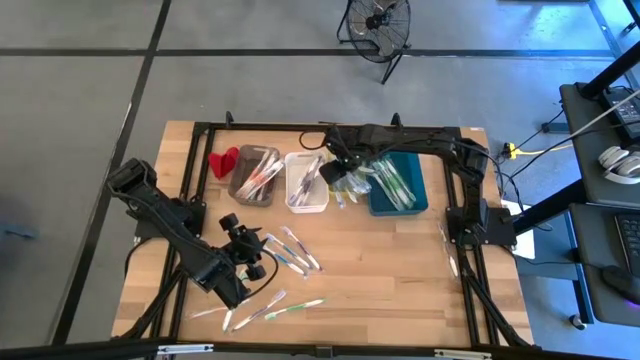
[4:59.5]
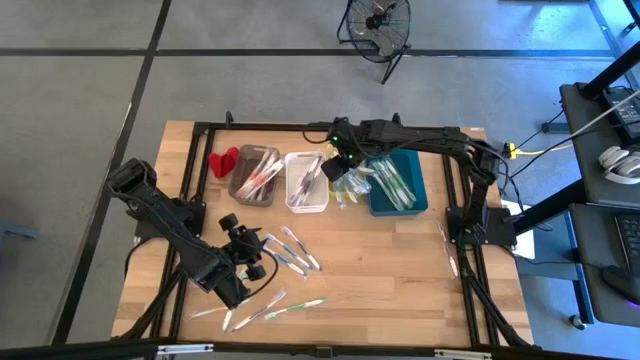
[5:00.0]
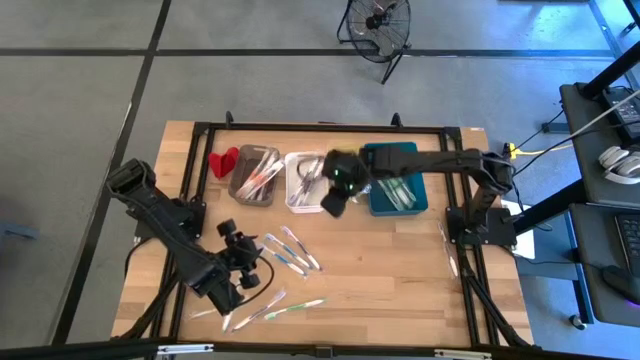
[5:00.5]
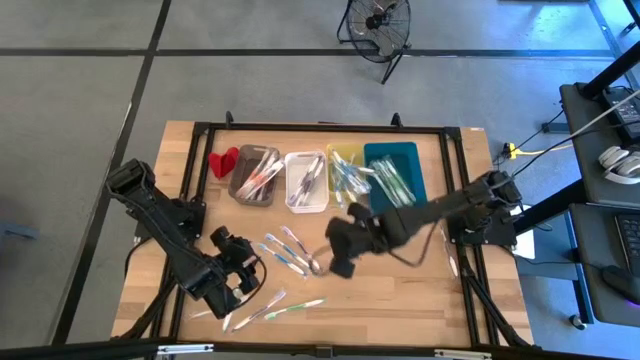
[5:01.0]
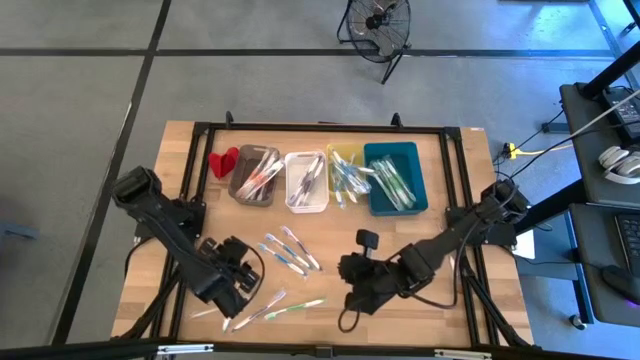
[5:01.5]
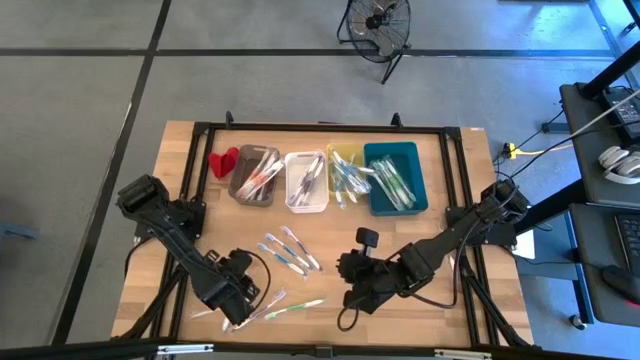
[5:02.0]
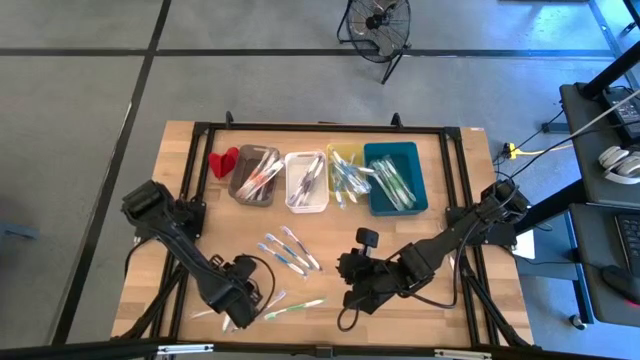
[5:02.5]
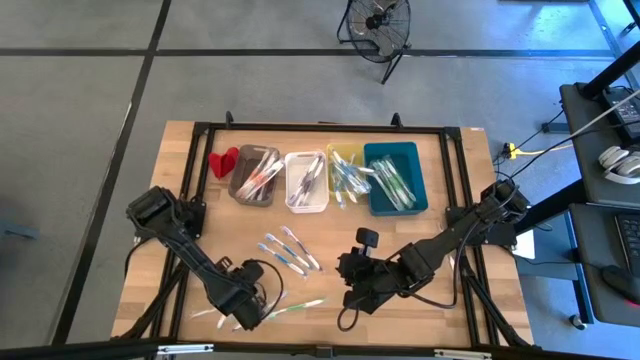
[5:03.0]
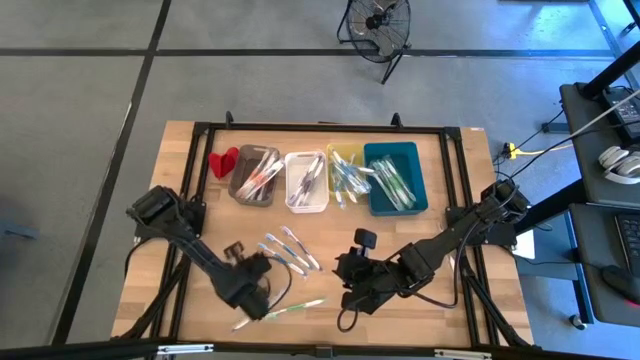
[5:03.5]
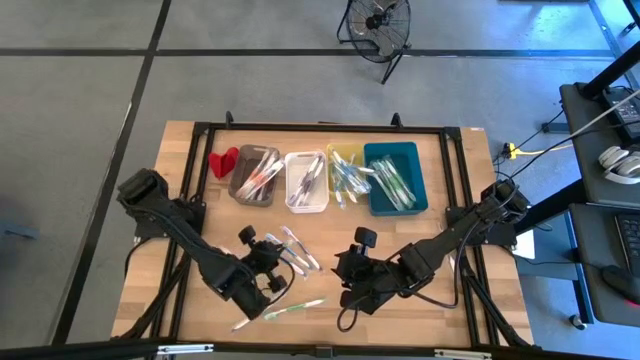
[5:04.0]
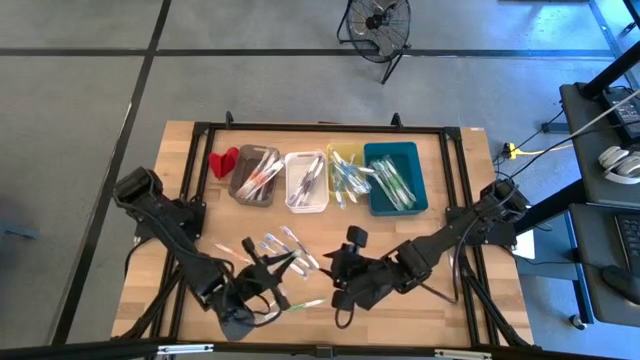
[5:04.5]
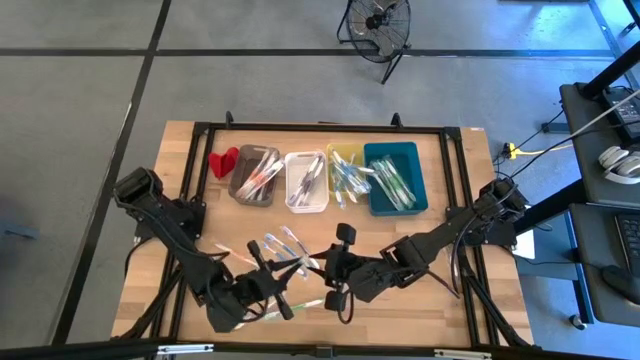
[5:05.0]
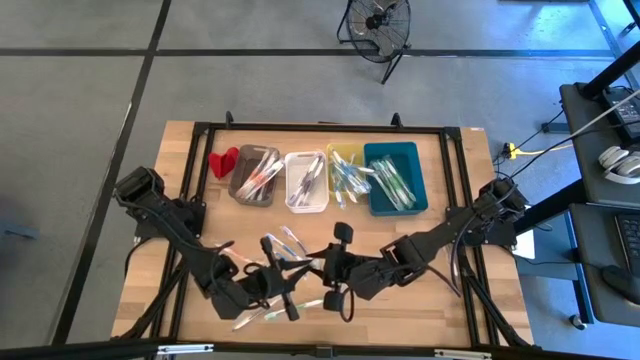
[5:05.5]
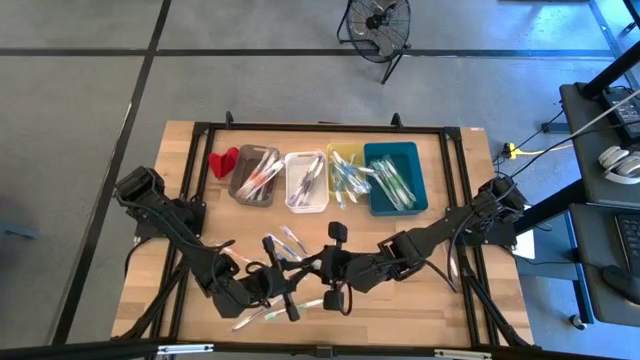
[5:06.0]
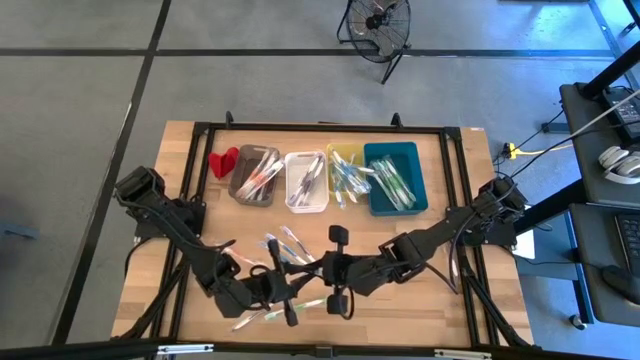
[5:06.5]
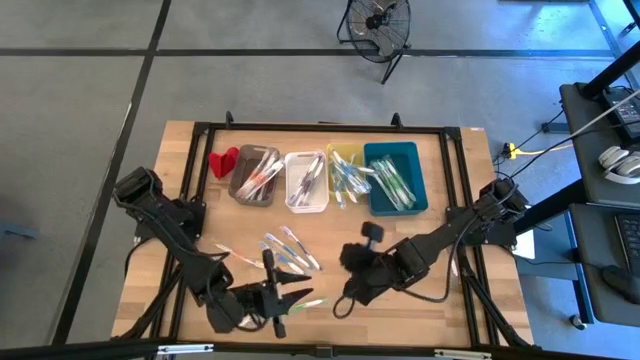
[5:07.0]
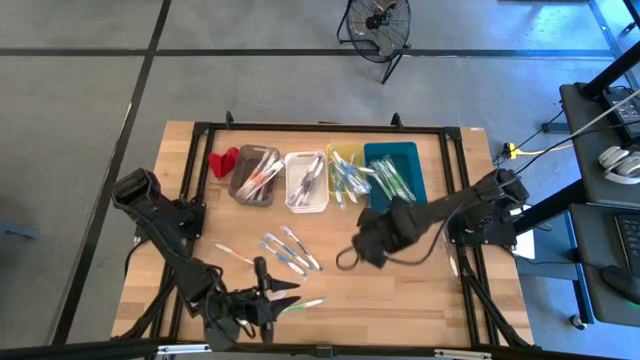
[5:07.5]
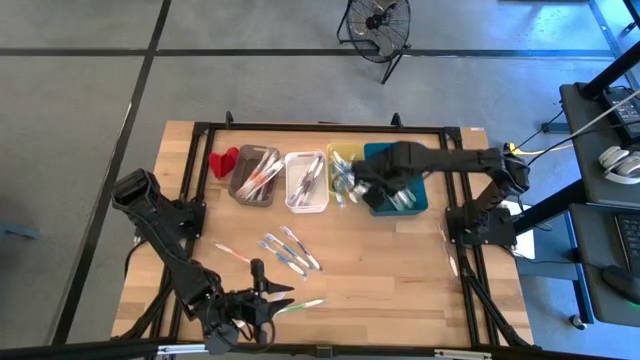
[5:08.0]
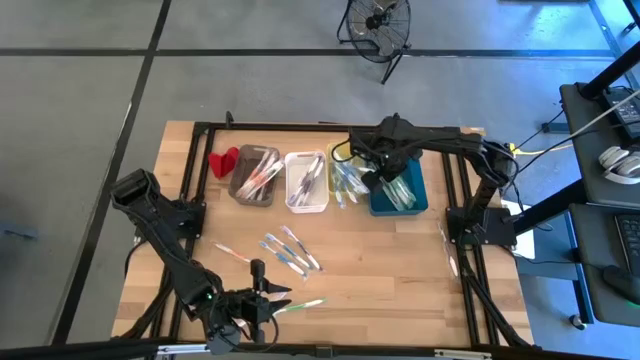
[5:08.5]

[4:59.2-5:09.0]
Task: Pick & Place Toothbrushes
Put the left green toothbrush into the blue bin

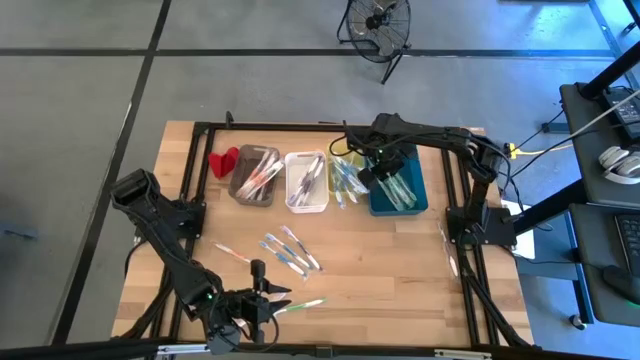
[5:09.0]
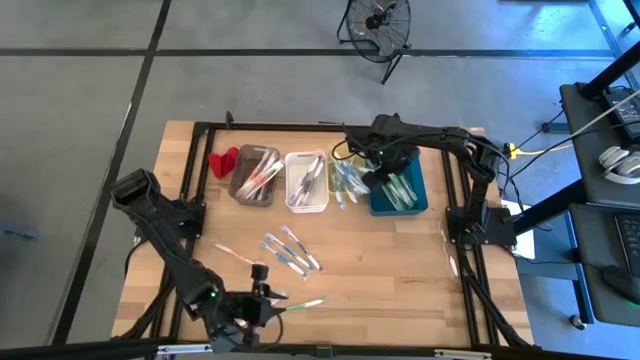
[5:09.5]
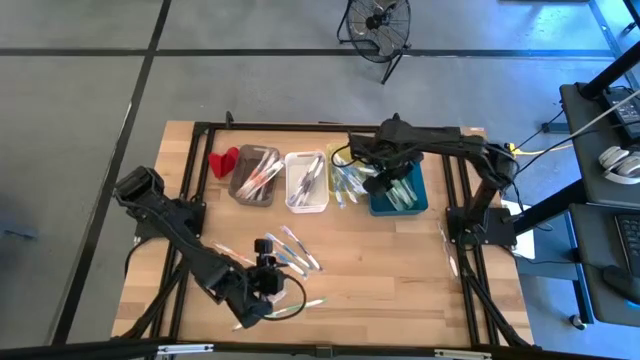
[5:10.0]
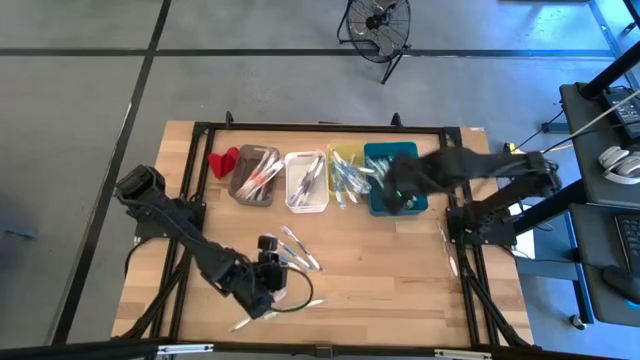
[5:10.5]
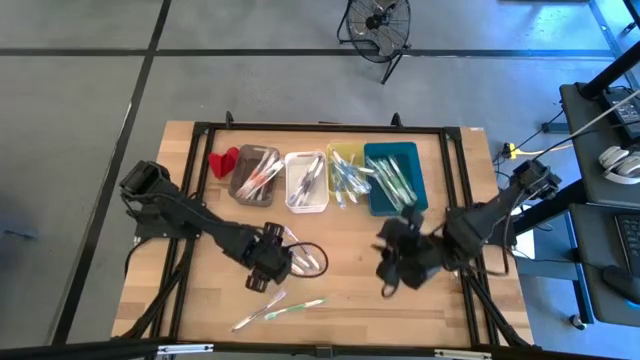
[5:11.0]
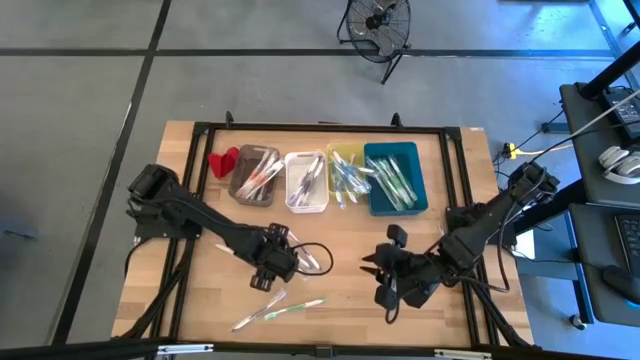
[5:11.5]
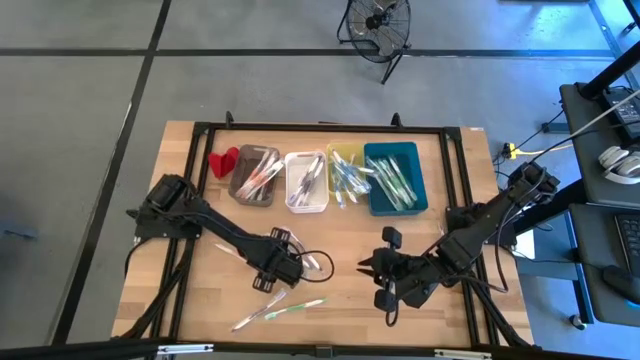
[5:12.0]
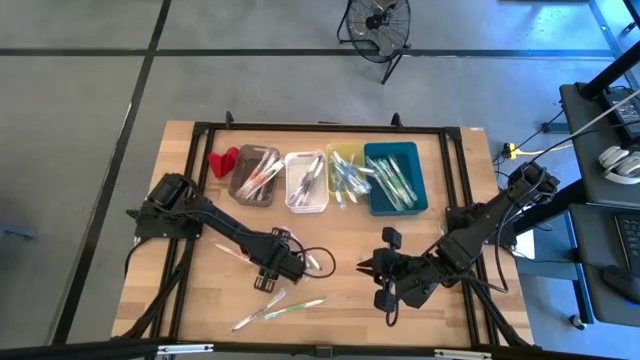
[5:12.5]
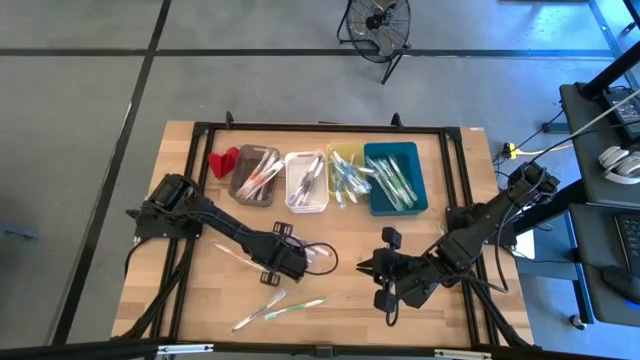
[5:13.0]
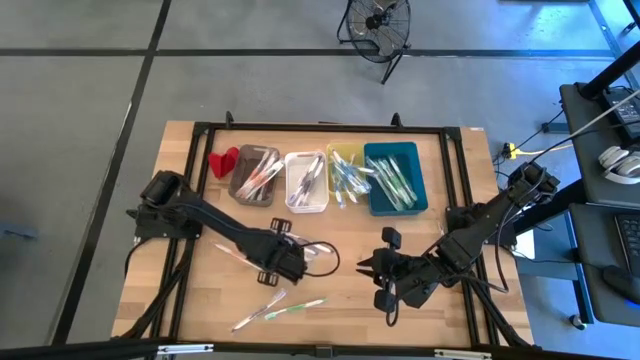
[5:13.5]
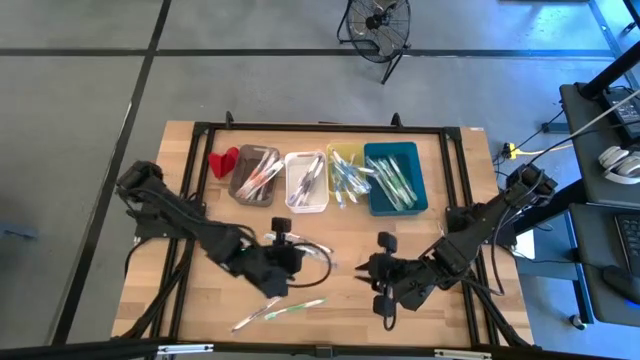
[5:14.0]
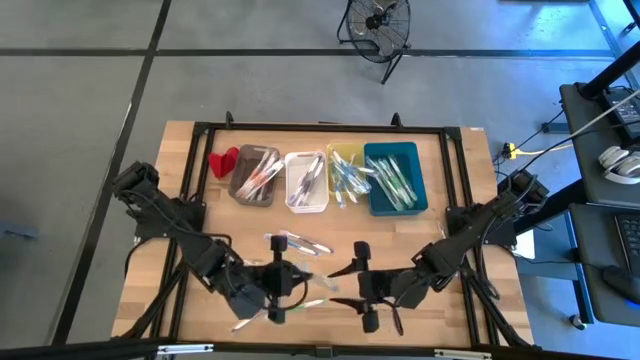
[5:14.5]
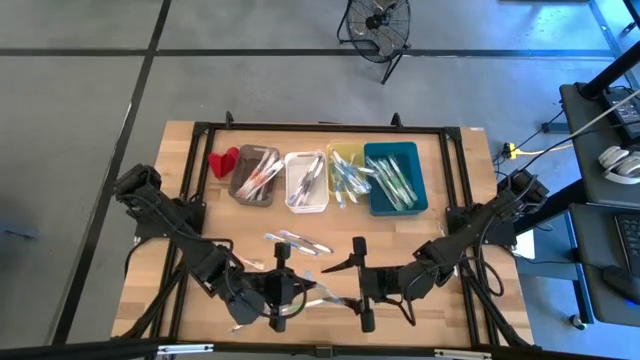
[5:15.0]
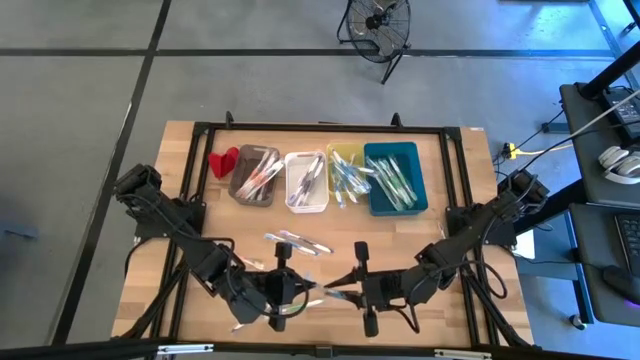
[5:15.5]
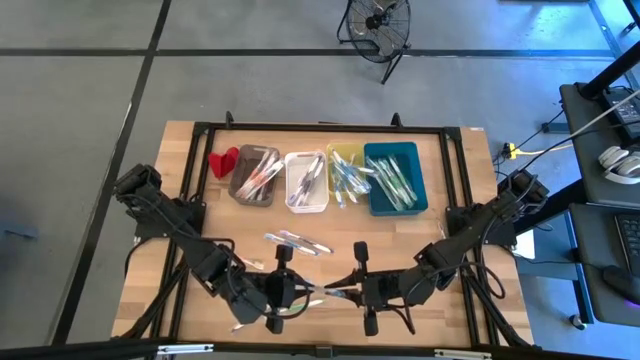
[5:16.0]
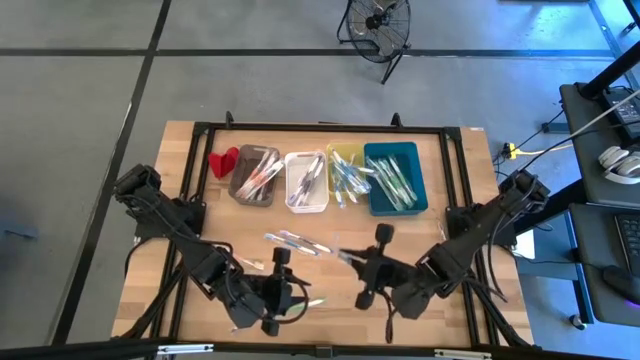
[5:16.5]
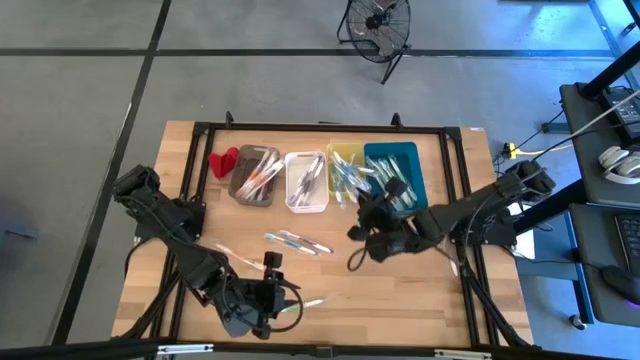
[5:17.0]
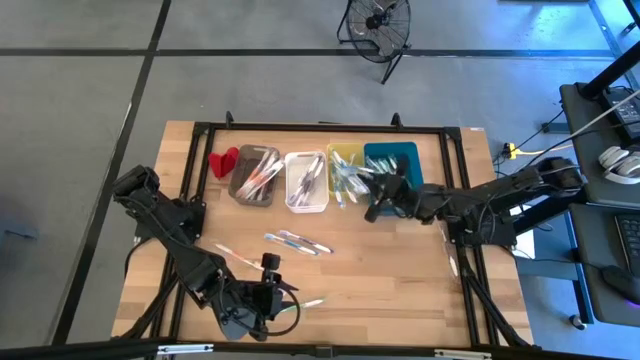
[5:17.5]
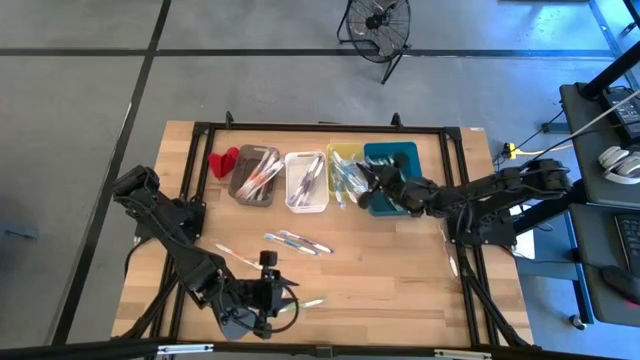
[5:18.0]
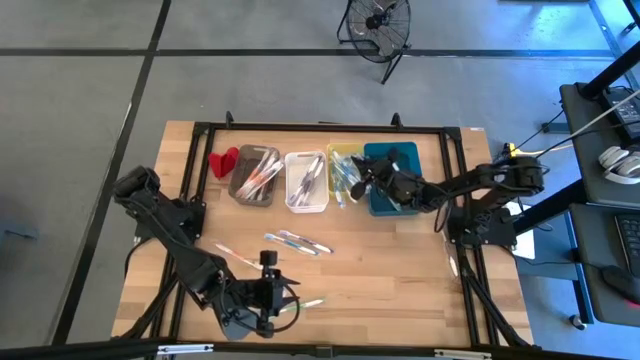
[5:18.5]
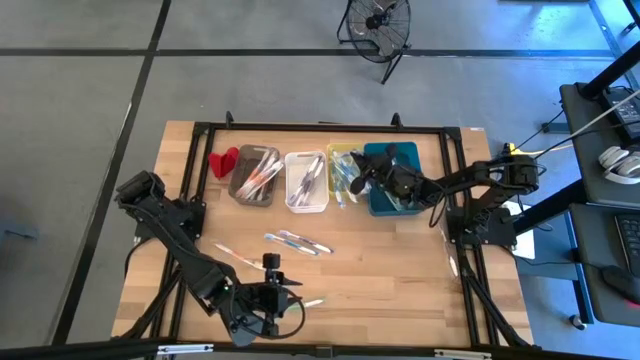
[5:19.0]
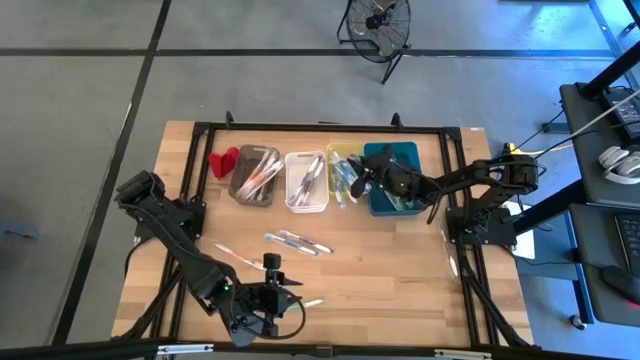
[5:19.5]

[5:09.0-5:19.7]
Put the left blue toothbrush into the yellow bin

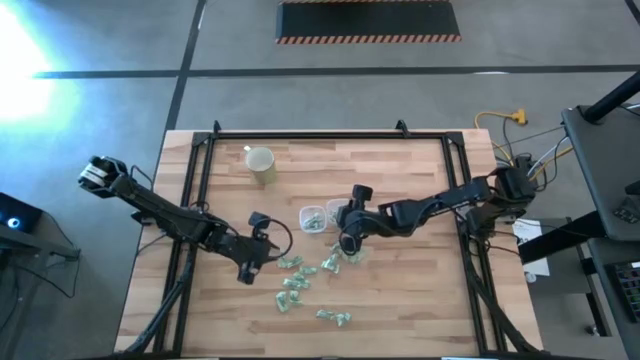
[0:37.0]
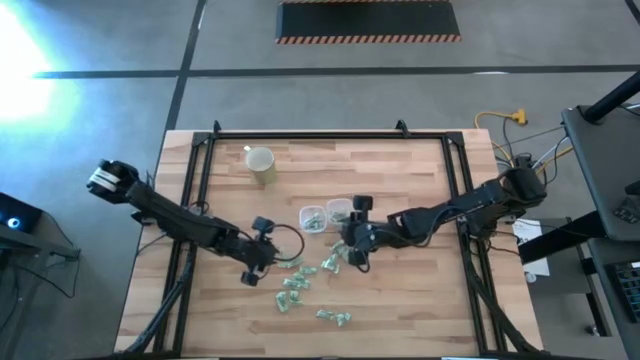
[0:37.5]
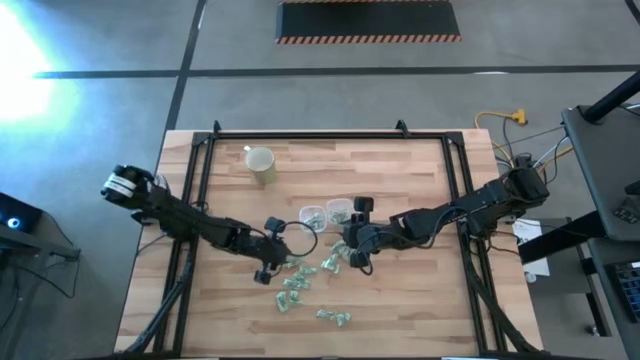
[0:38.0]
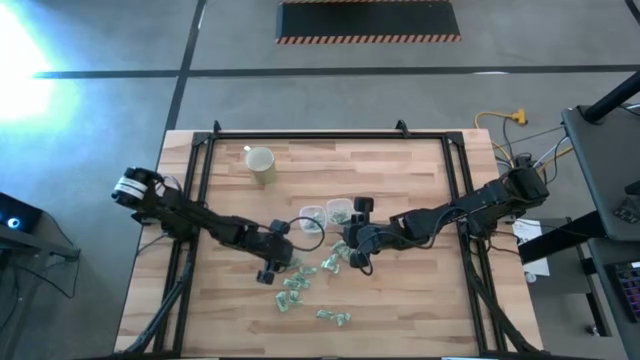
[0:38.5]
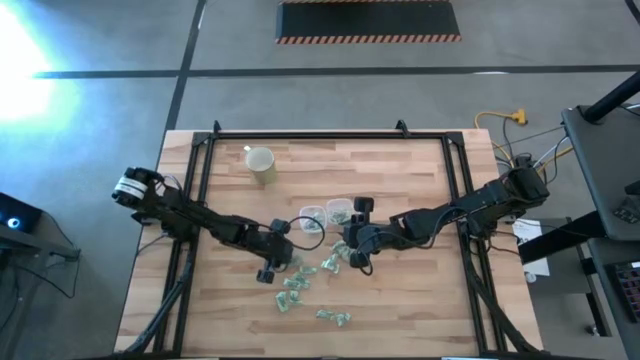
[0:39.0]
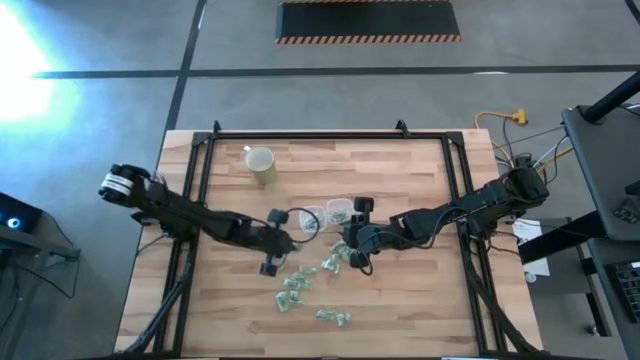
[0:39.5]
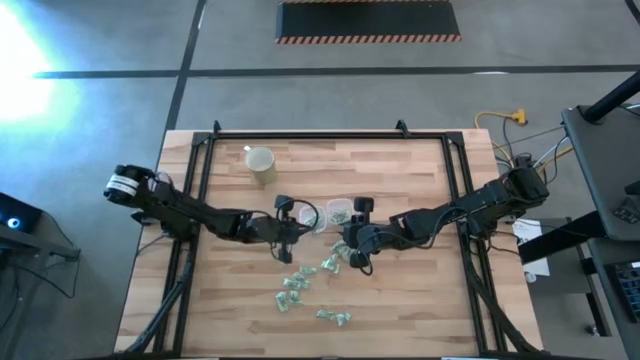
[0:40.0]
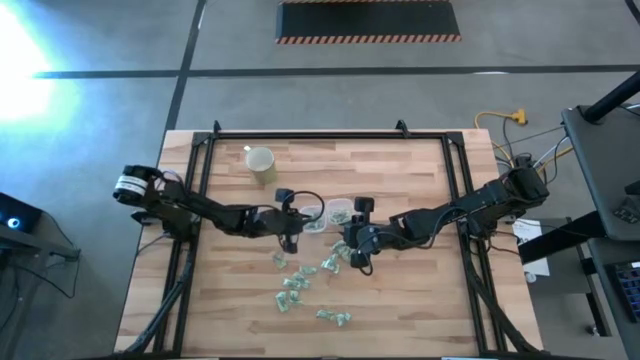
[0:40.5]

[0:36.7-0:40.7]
Task: Pick and place items into bin
Put the stevia packet into the left transparent bin
